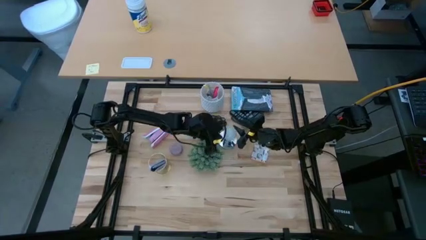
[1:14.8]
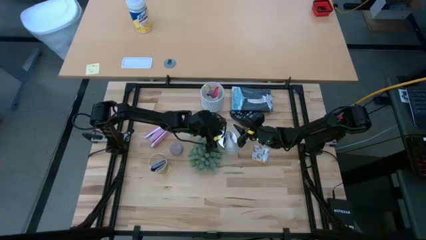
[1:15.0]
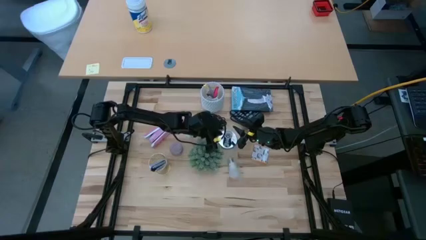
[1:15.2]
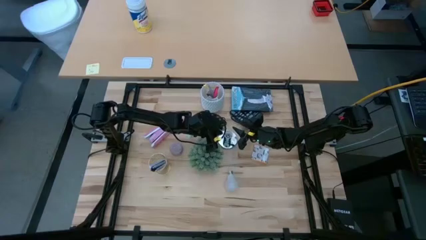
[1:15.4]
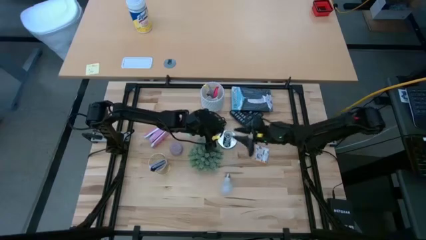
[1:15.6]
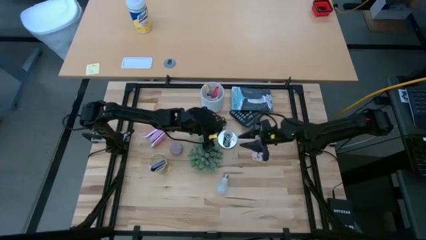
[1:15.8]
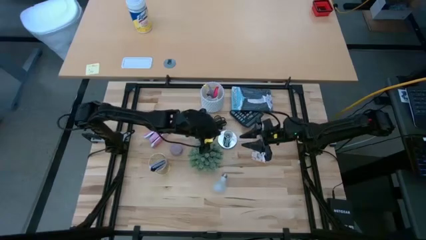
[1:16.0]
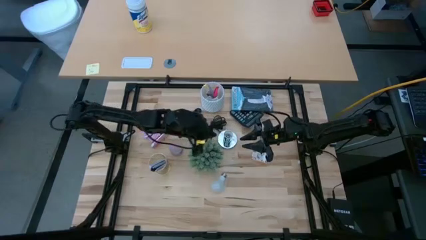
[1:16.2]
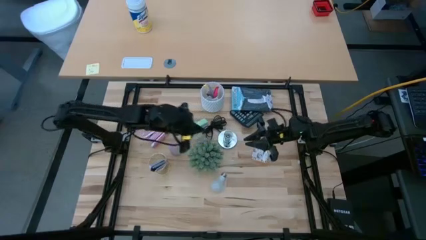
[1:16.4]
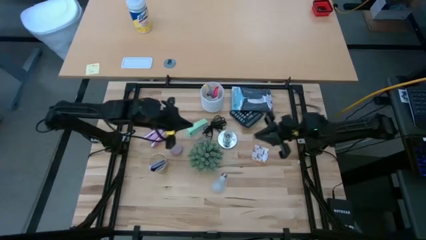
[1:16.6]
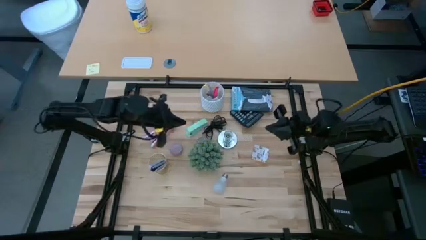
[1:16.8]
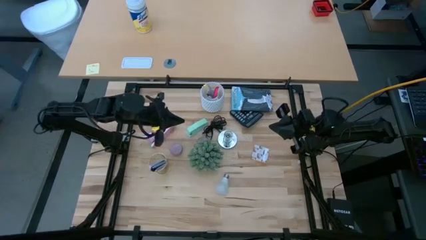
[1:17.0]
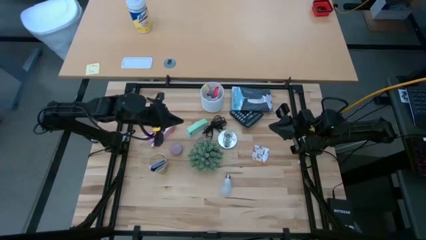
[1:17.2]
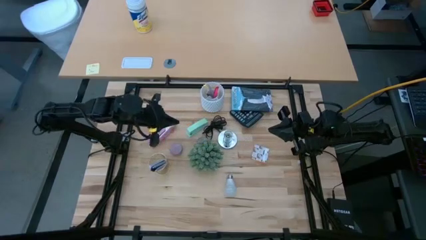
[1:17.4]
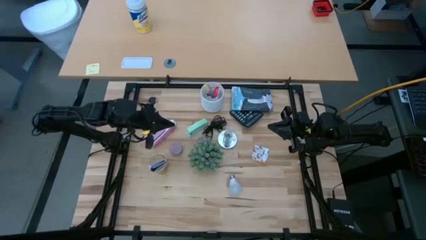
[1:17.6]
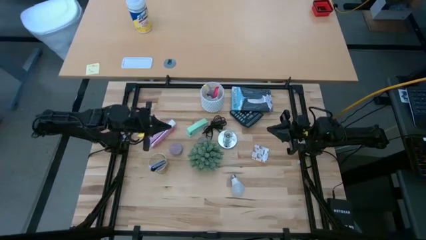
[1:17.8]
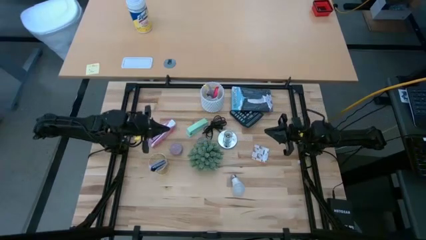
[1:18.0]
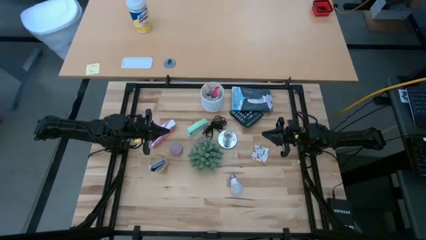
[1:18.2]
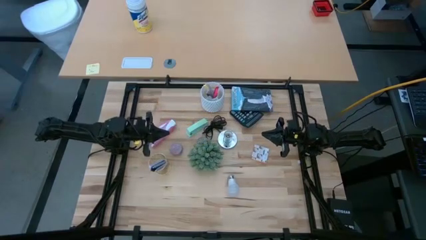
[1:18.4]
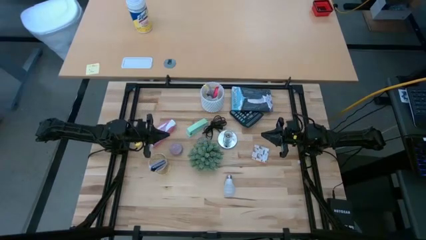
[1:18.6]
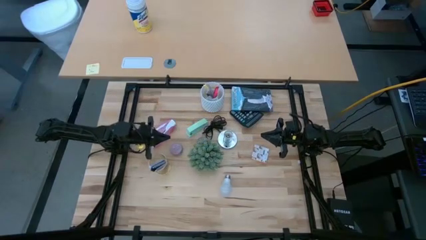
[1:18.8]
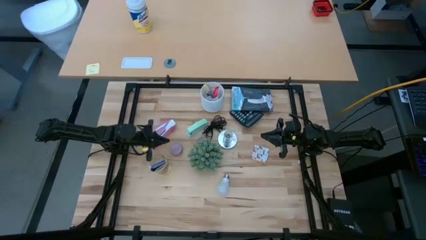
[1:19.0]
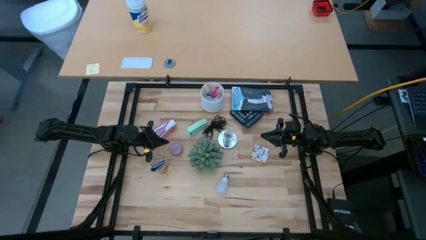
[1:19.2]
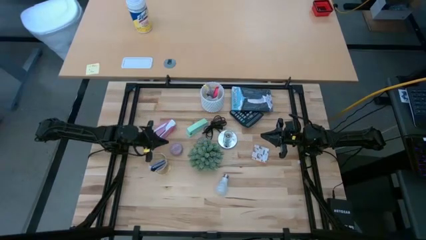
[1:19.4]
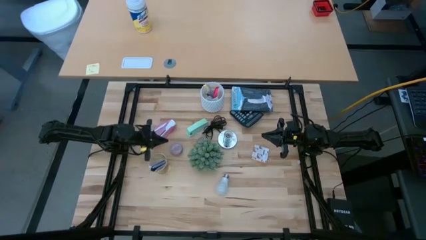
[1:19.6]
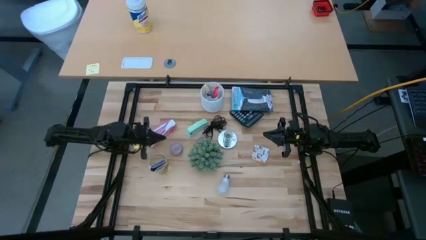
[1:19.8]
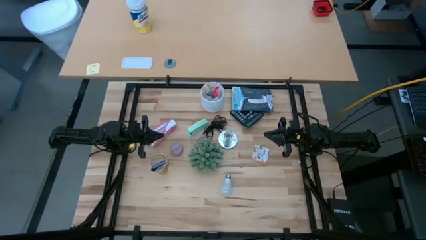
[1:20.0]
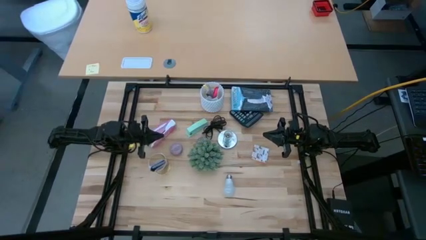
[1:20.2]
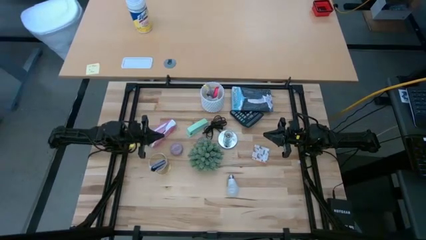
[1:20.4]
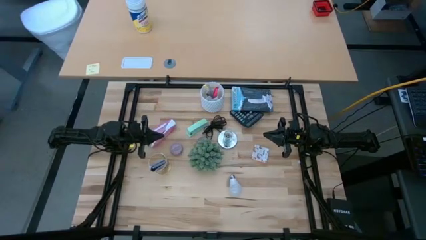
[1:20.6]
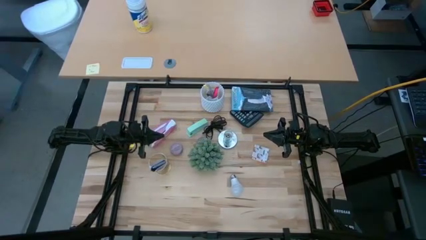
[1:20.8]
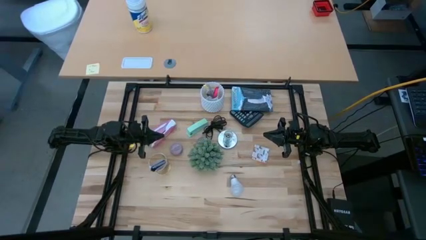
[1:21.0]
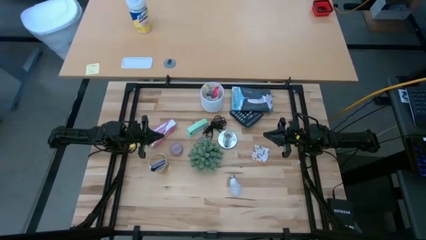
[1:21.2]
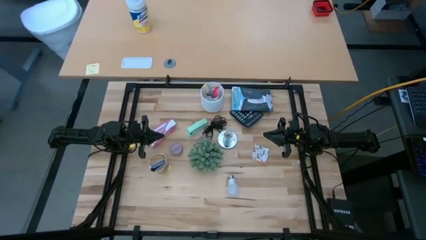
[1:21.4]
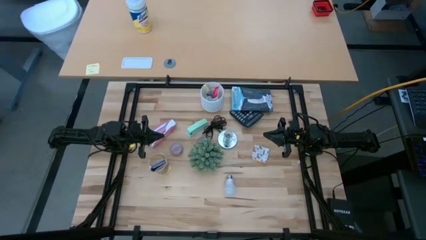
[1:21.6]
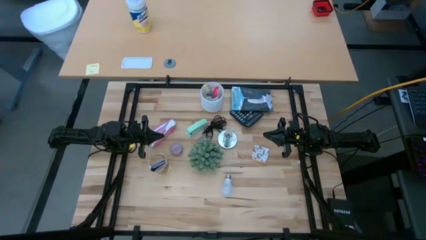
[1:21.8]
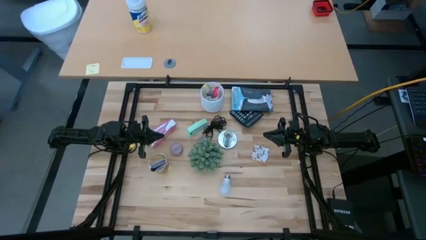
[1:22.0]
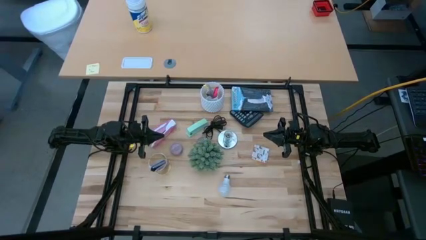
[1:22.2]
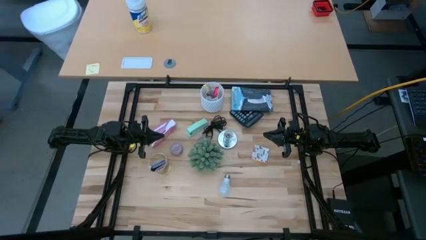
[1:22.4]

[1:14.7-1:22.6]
Task: Screw lightbulb
Return to Home Position

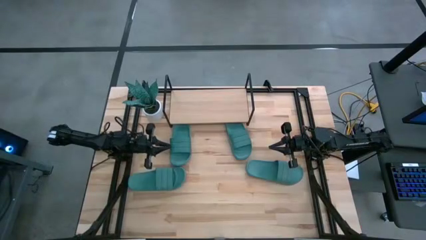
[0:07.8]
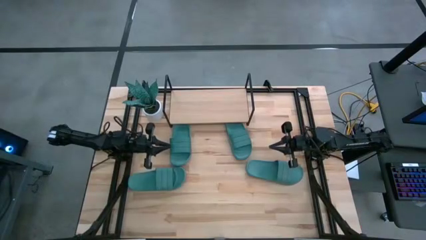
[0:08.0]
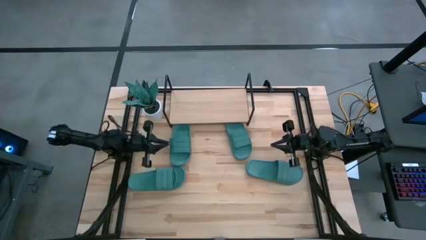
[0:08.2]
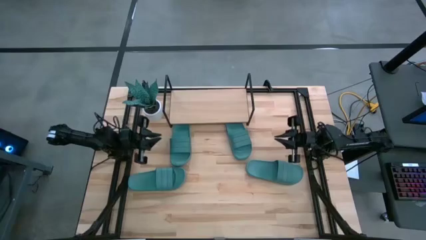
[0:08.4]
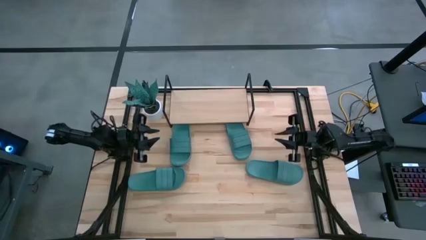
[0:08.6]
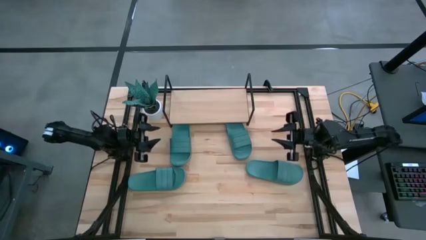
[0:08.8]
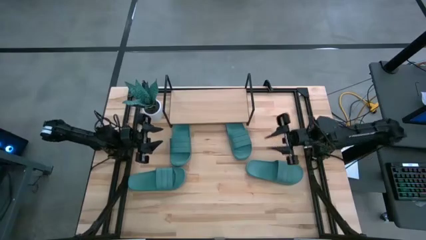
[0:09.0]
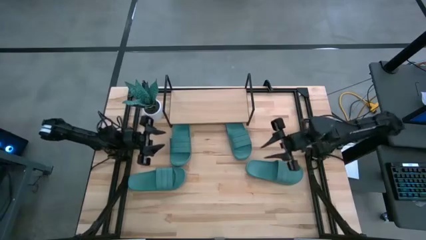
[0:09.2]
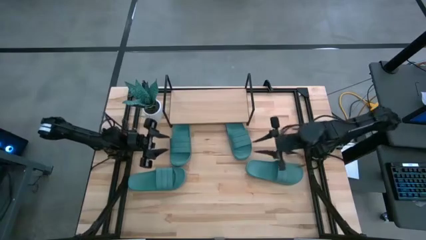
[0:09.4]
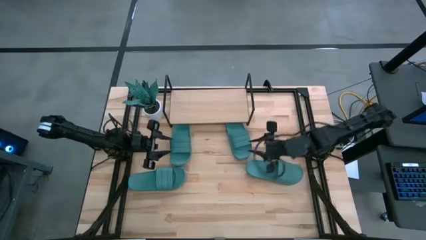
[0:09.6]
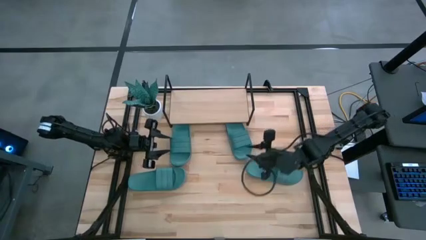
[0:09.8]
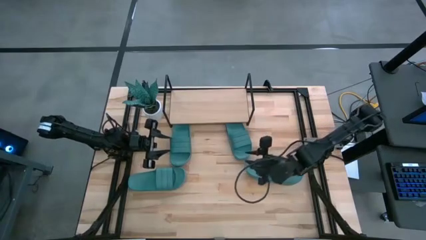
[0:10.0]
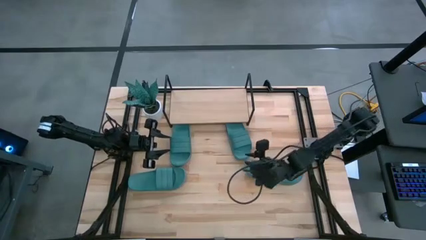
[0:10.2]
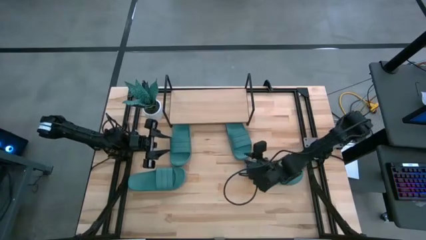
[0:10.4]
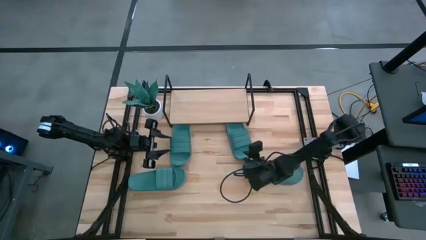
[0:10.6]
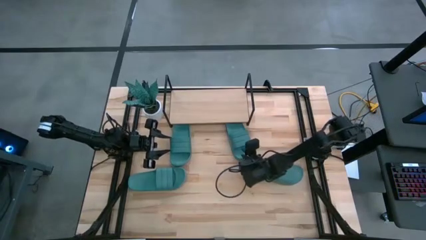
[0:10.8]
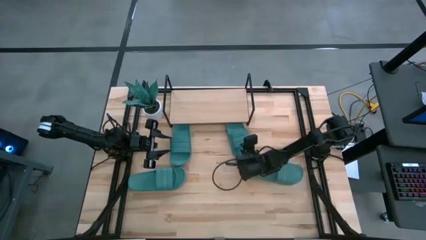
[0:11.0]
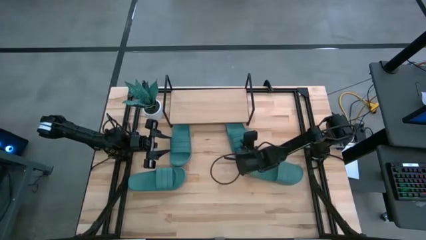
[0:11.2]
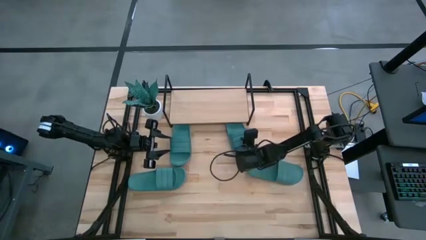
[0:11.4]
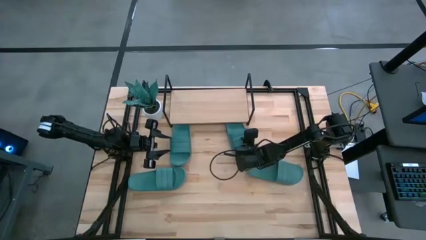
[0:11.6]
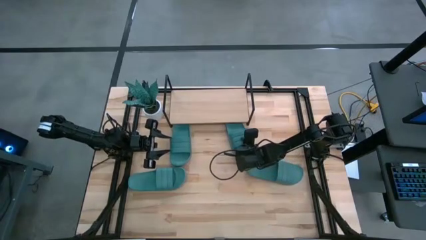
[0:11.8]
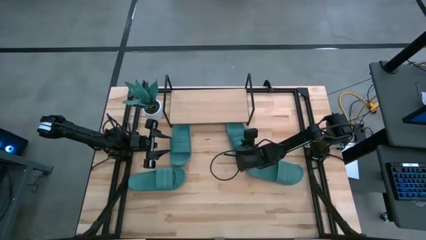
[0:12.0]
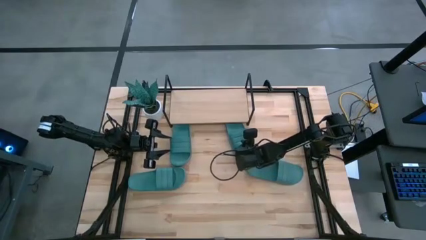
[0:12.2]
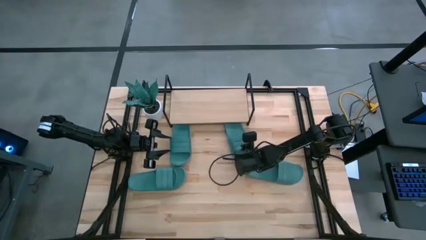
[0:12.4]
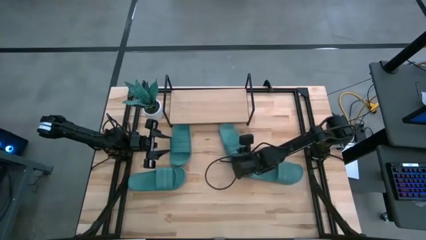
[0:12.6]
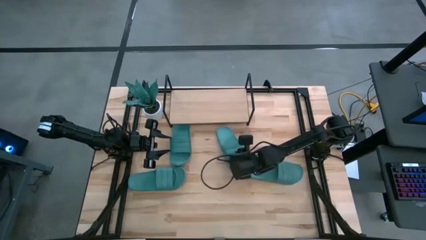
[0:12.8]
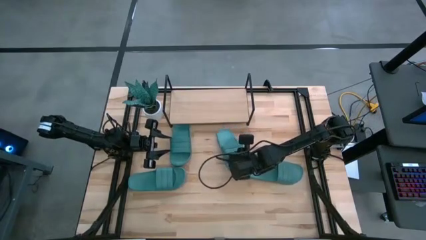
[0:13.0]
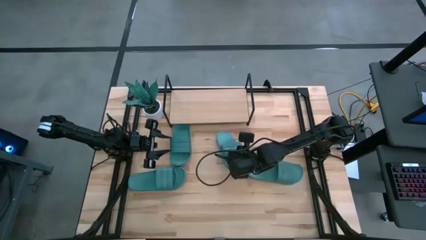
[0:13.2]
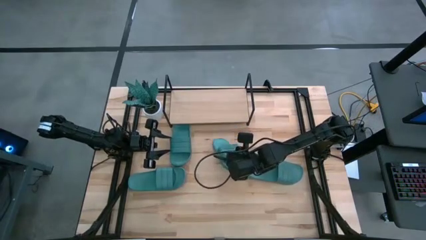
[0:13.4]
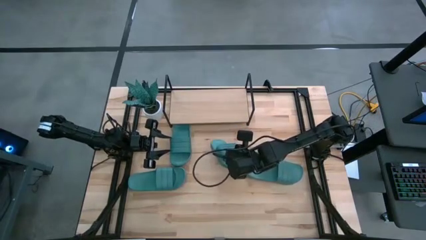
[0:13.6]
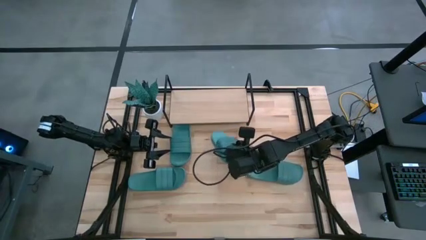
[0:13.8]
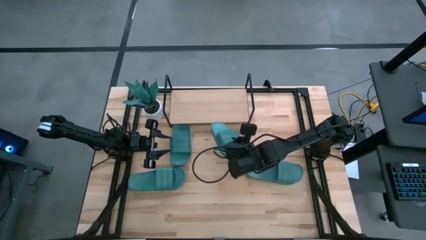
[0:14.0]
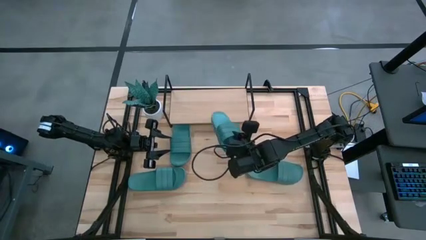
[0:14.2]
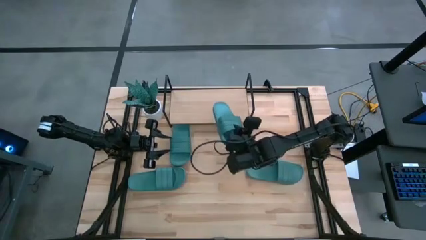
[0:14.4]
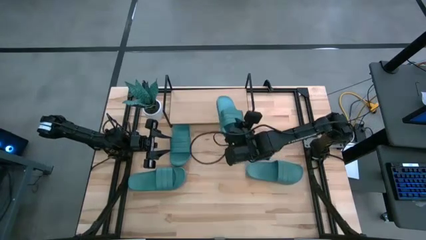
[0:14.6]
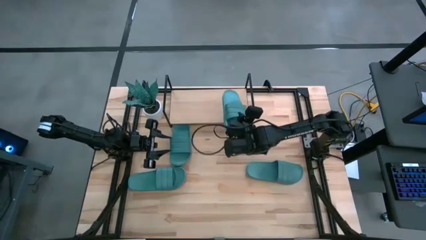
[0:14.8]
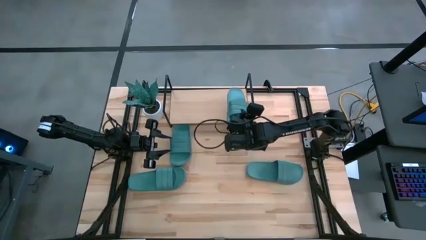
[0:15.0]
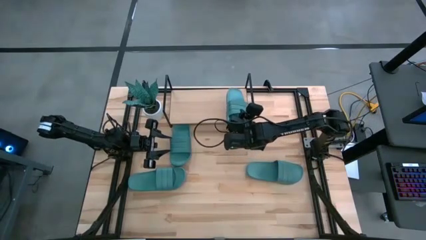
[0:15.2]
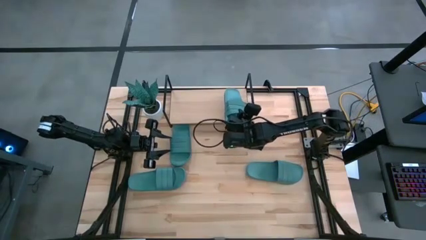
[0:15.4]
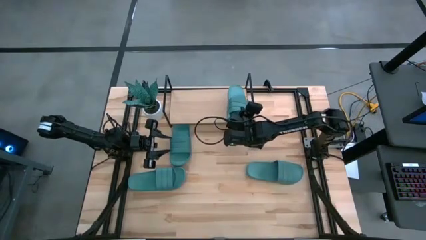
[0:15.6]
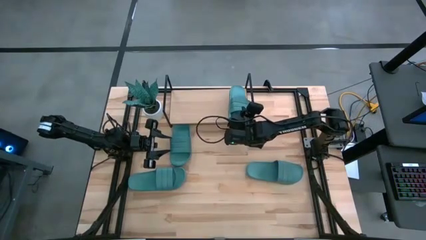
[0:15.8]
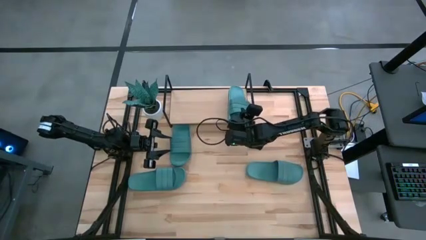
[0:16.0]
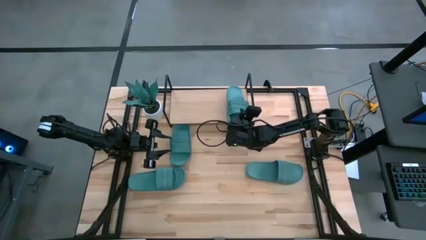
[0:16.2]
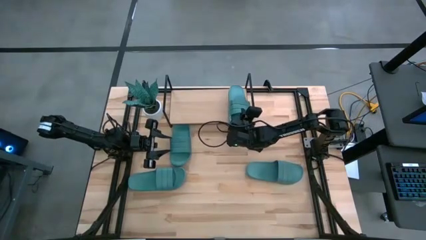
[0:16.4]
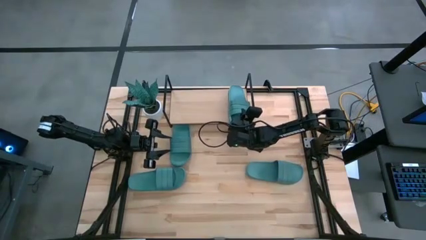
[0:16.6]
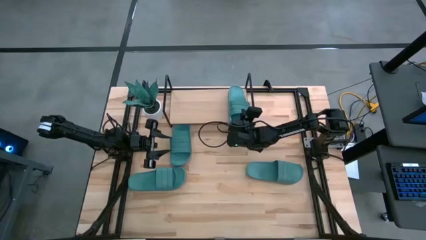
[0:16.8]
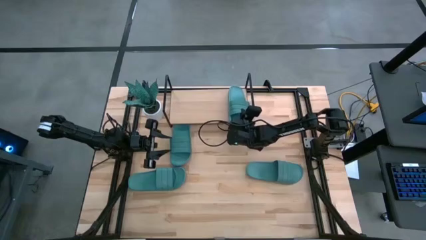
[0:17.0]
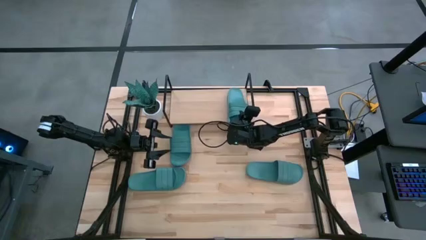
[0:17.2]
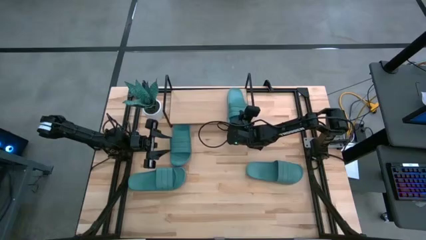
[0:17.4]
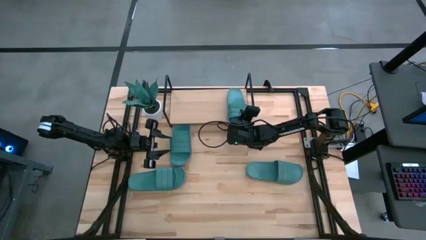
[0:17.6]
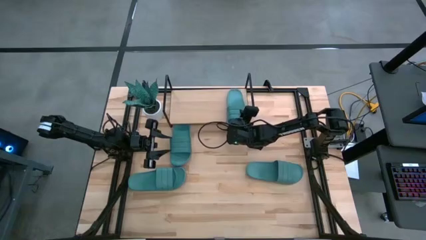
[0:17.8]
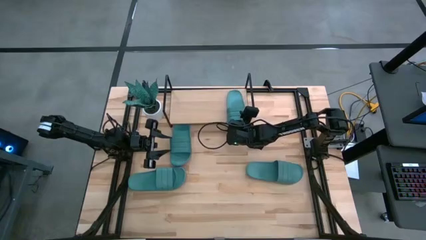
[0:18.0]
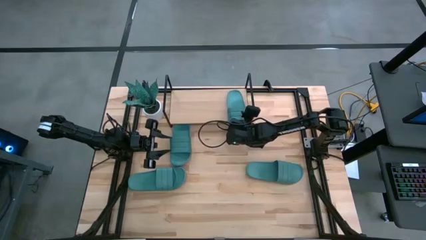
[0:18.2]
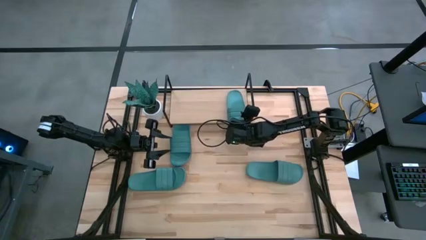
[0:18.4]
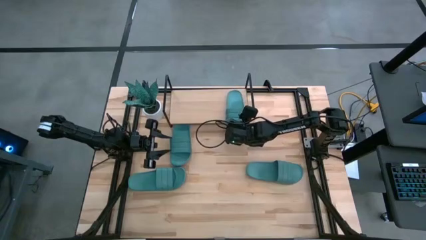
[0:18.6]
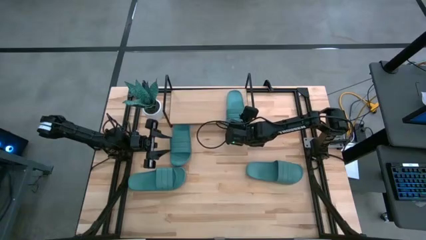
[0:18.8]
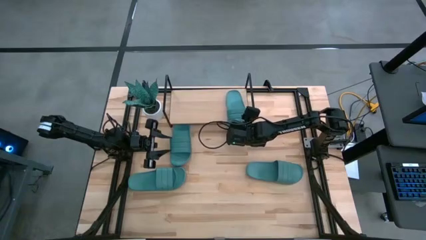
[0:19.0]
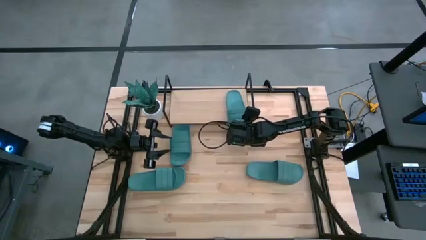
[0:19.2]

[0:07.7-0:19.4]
Task: Pick and place slides into the shelf
Put the green slipper on the shelf
